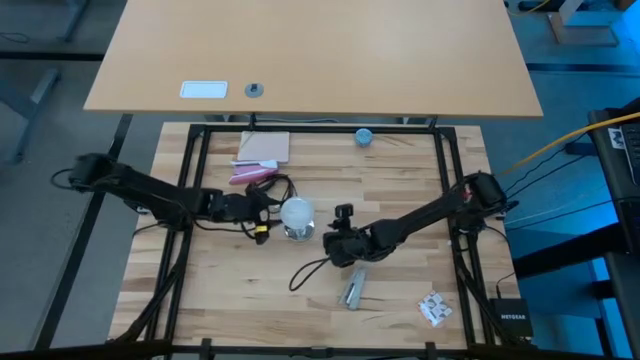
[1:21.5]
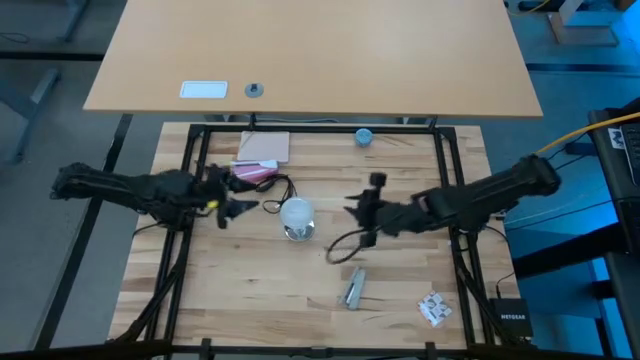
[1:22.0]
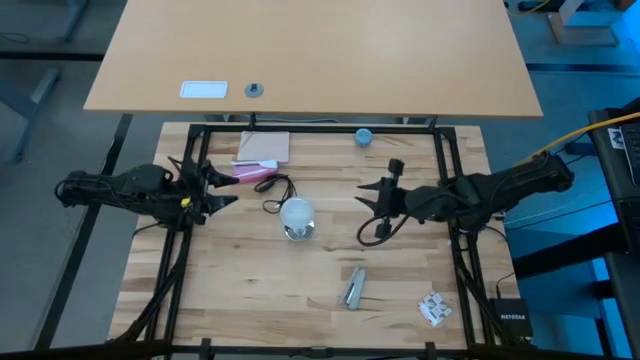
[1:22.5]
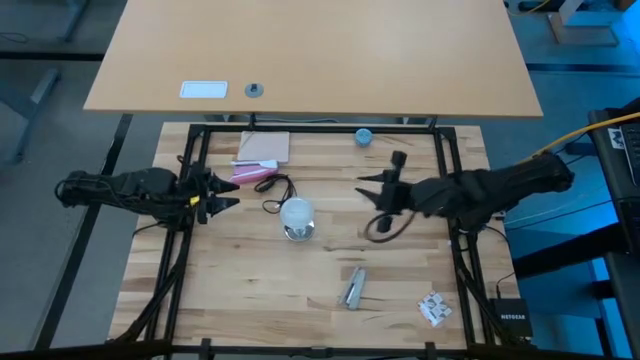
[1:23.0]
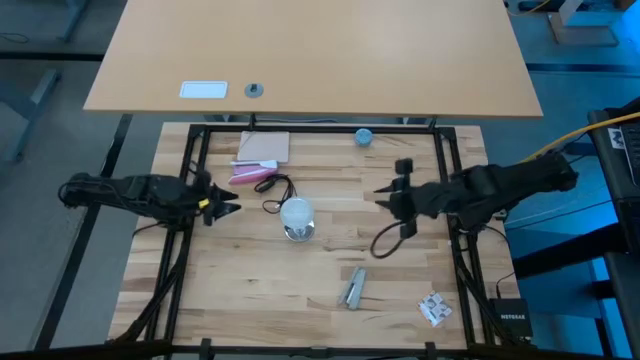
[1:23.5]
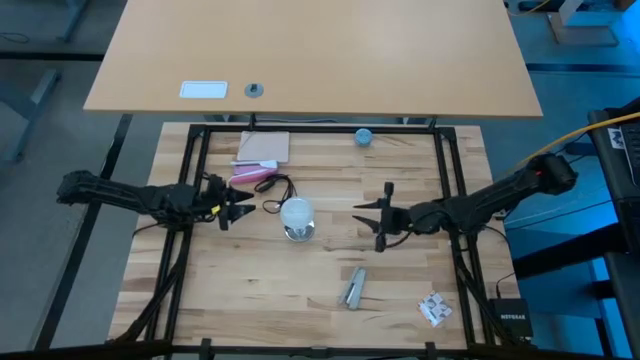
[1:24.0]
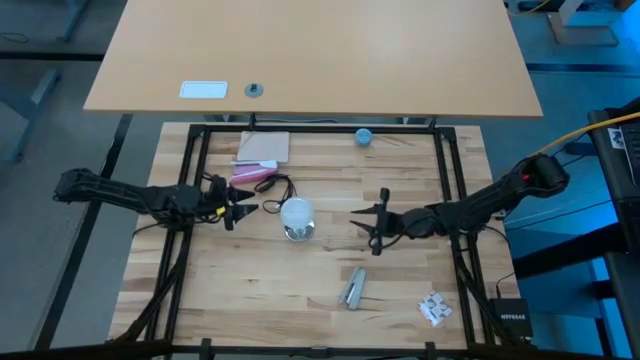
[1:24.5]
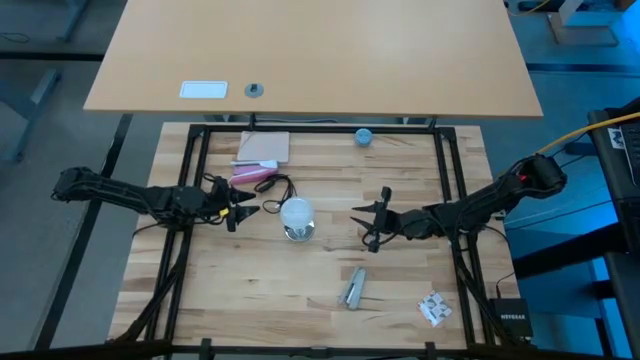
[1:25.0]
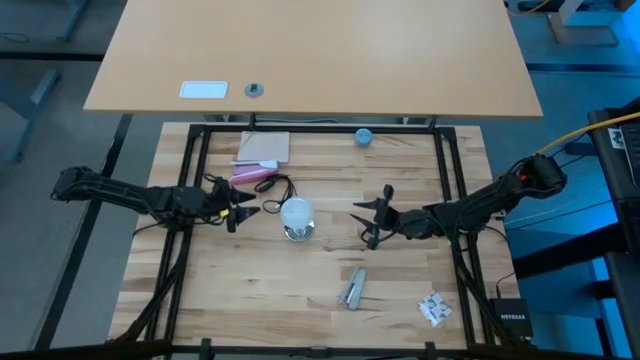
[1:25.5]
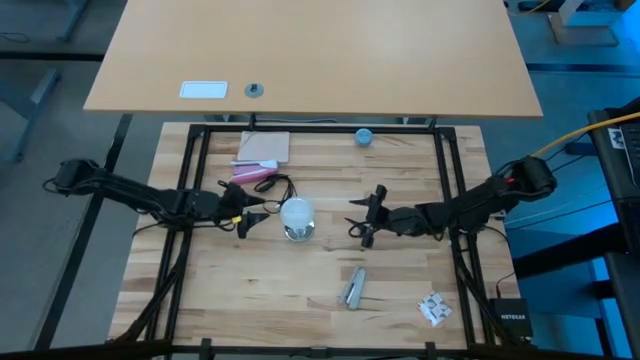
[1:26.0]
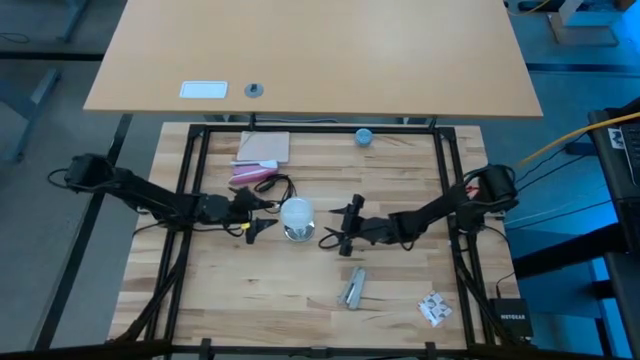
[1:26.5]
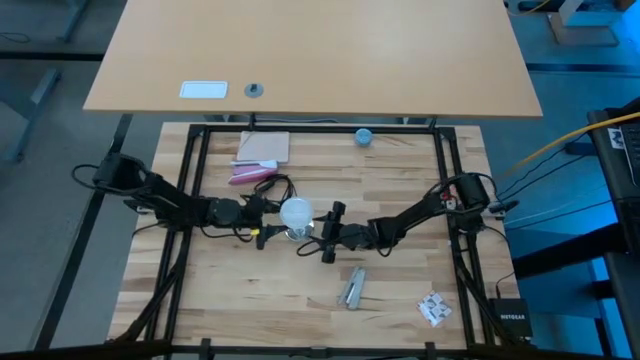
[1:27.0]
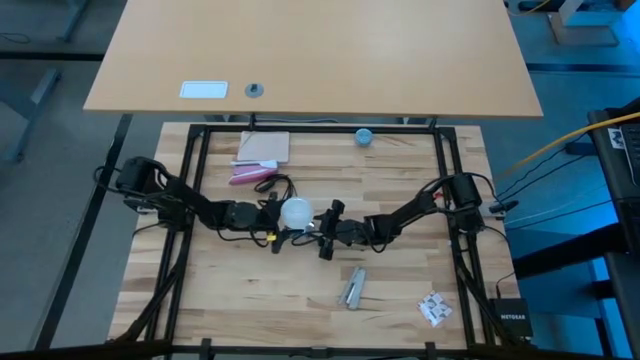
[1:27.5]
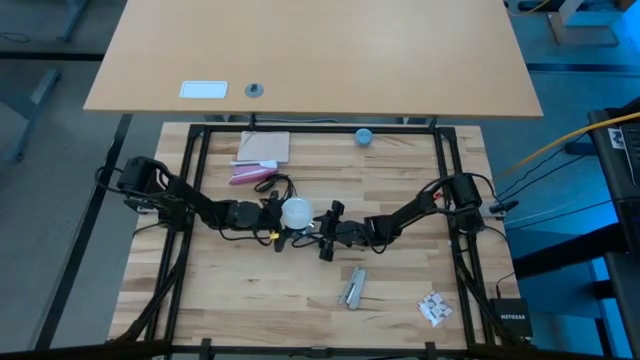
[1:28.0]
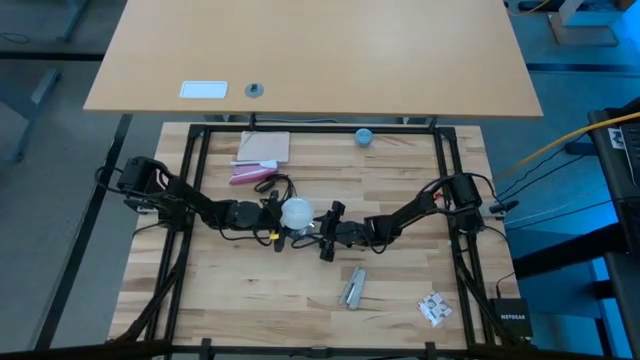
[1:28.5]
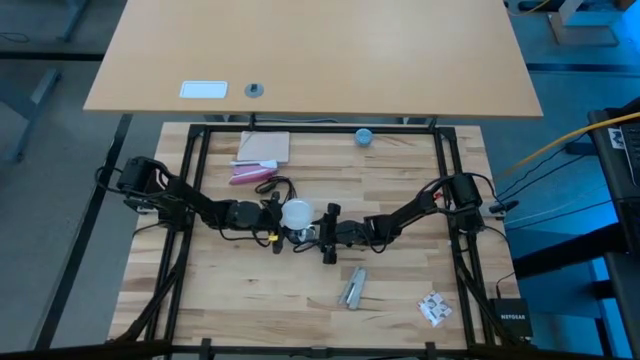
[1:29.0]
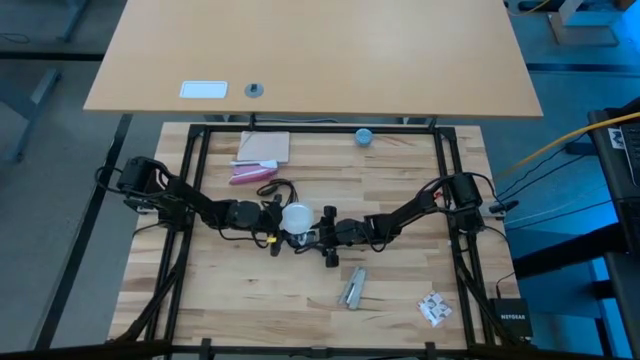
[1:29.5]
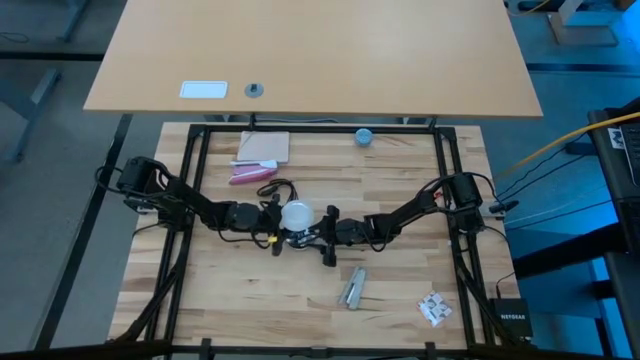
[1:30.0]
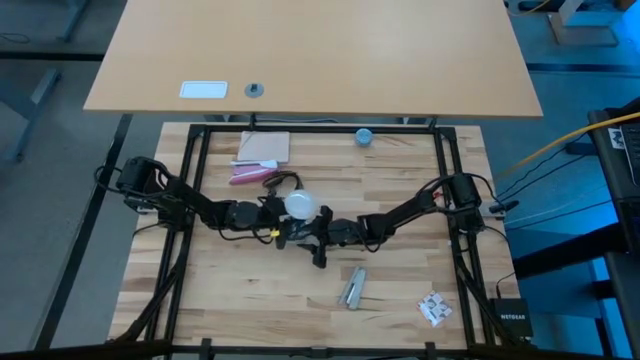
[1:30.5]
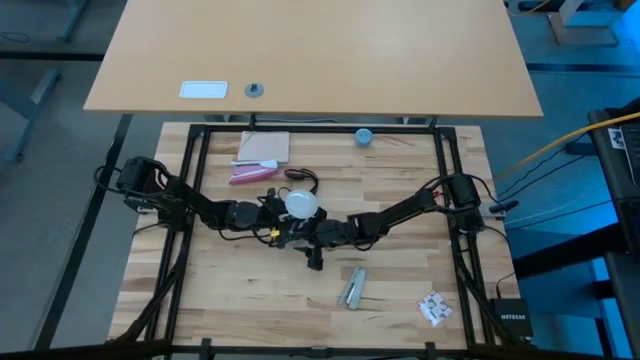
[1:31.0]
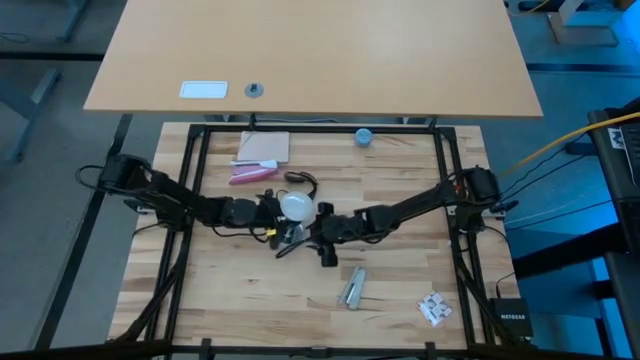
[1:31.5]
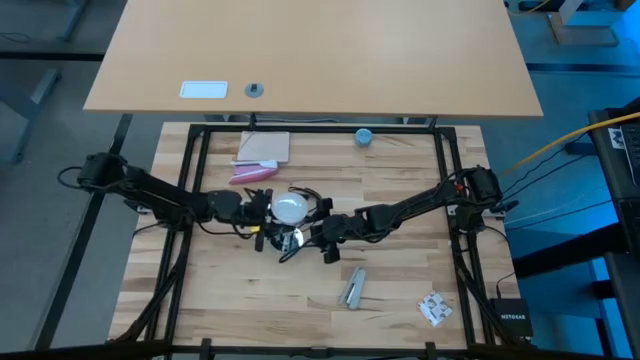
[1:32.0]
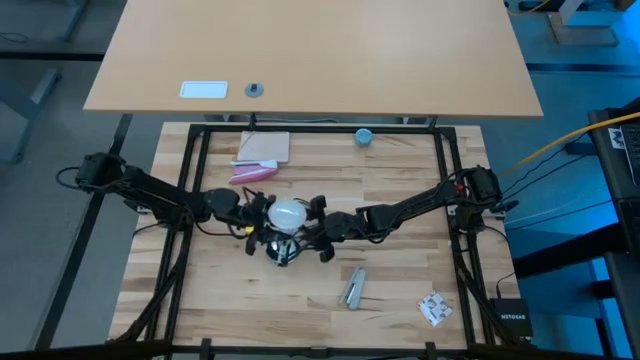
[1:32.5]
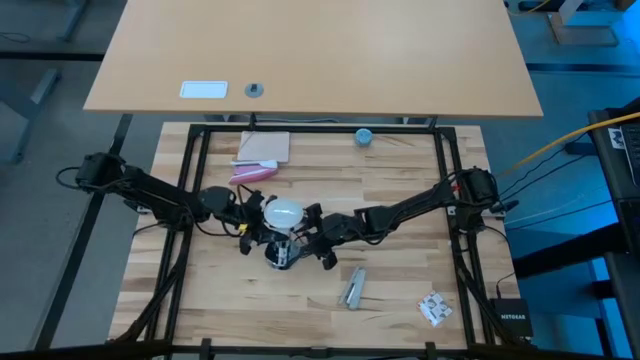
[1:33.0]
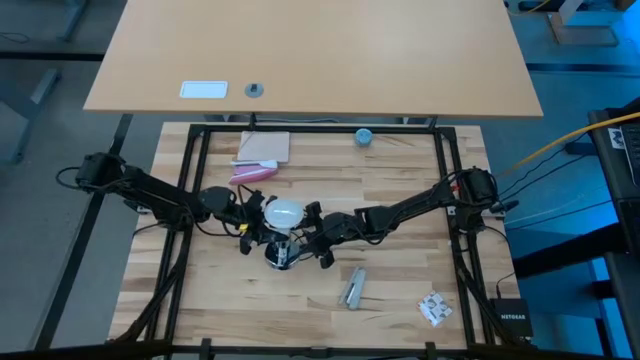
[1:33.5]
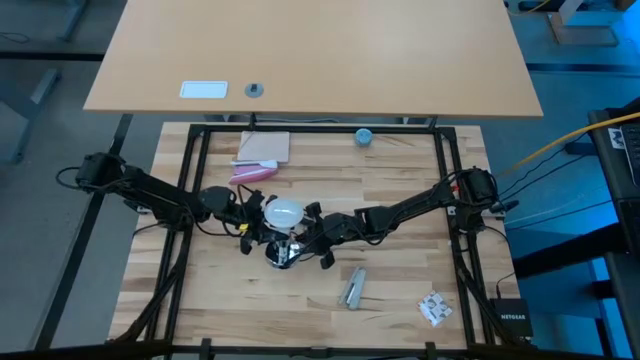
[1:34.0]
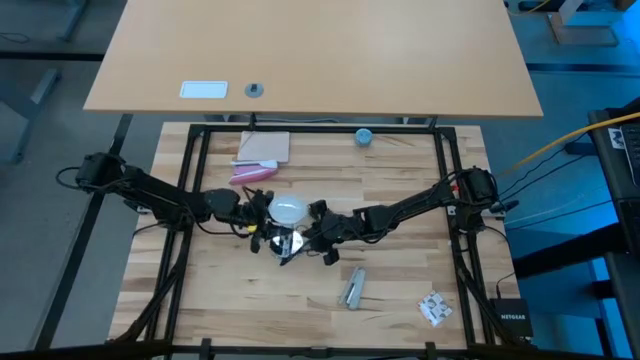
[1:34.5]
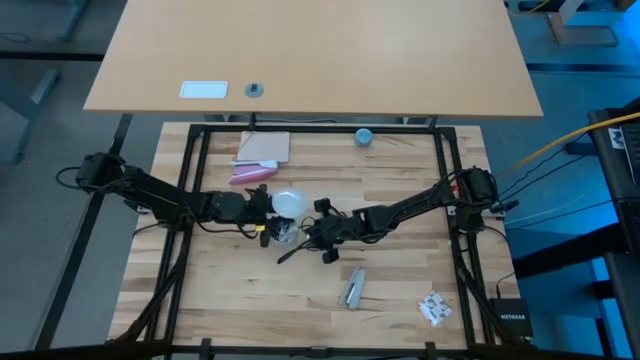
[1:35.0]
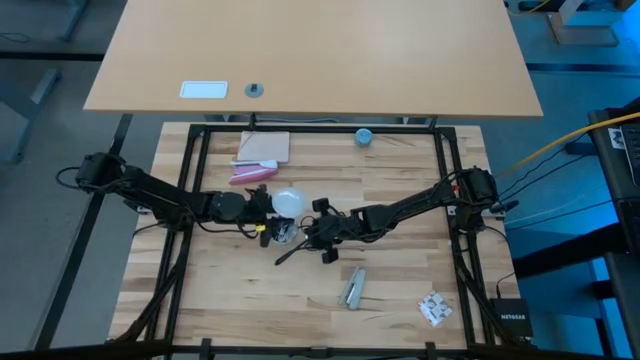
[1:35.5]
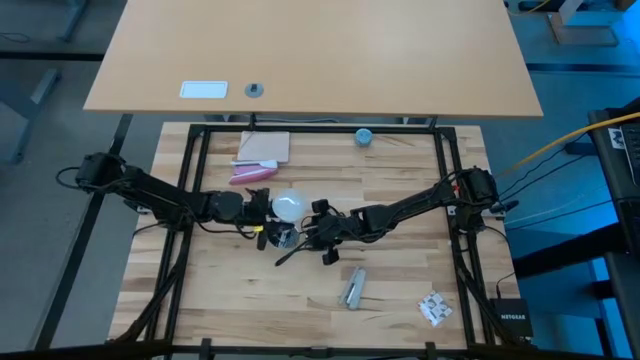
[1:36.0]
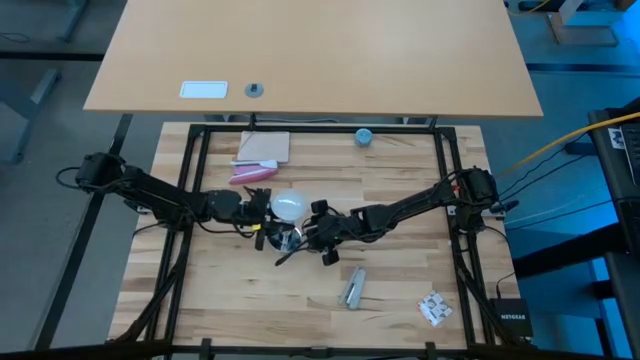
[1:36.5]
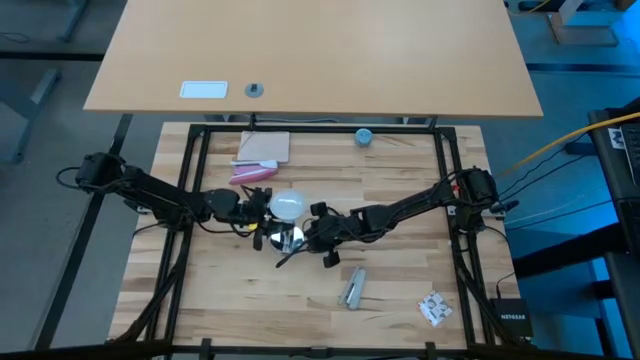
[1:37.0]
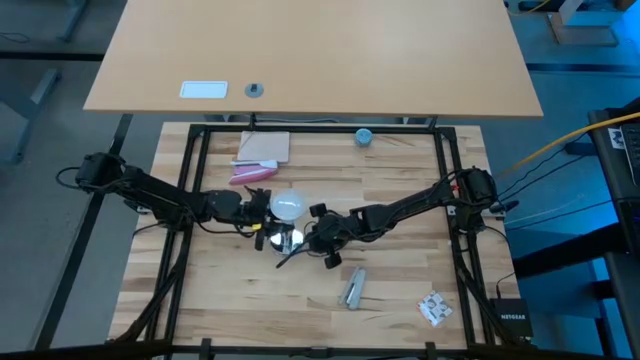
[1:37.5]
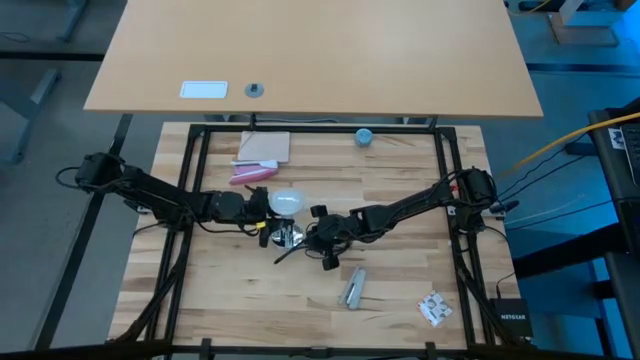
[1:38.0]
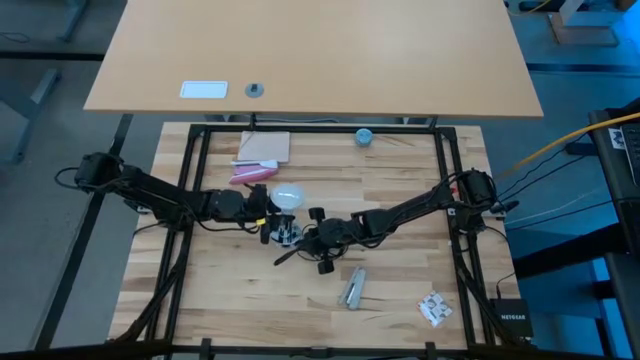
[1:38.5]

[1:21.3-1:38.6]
Task: Screw lightbulb
Remove the lightbulb from the lamp

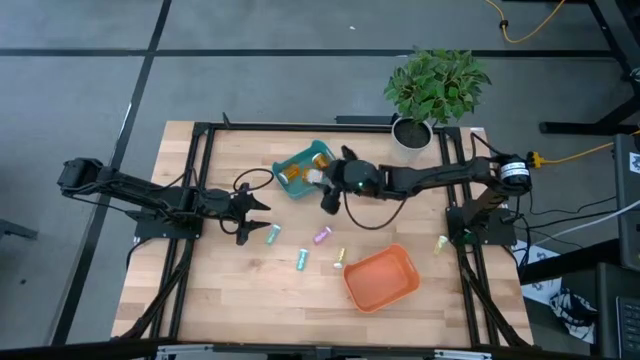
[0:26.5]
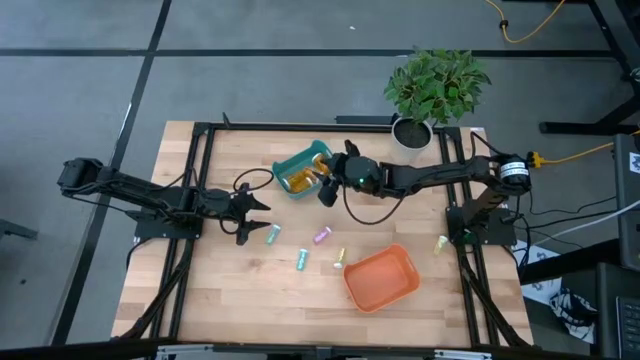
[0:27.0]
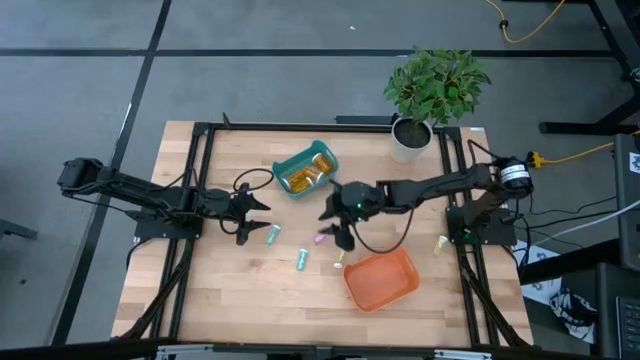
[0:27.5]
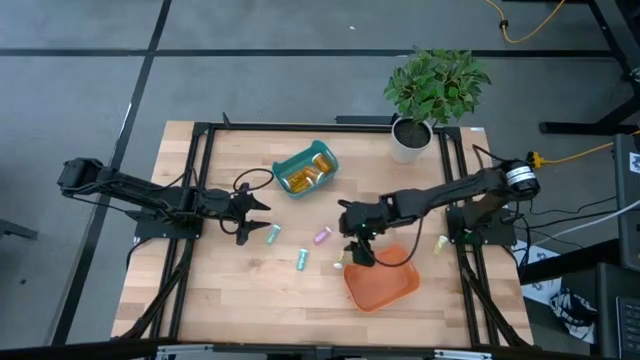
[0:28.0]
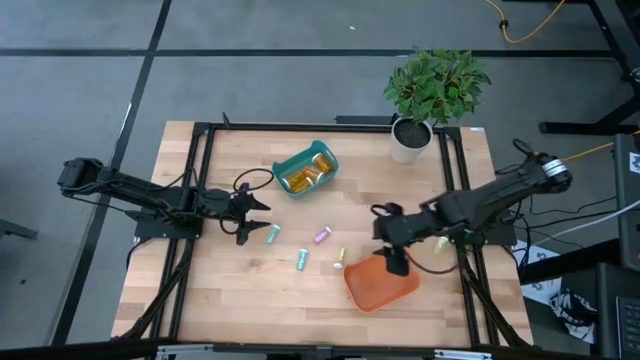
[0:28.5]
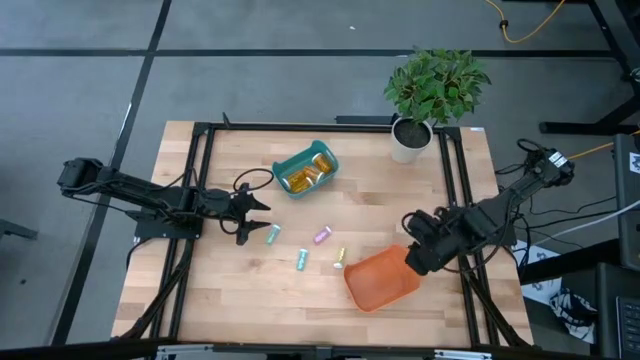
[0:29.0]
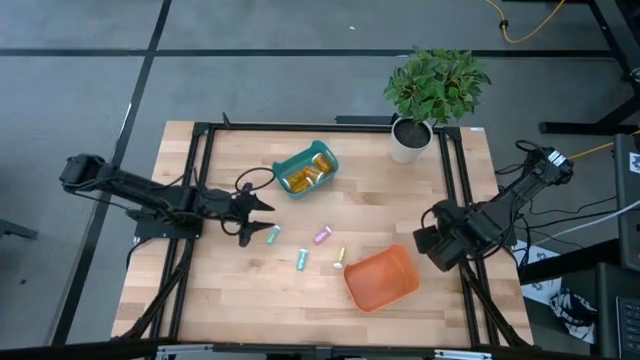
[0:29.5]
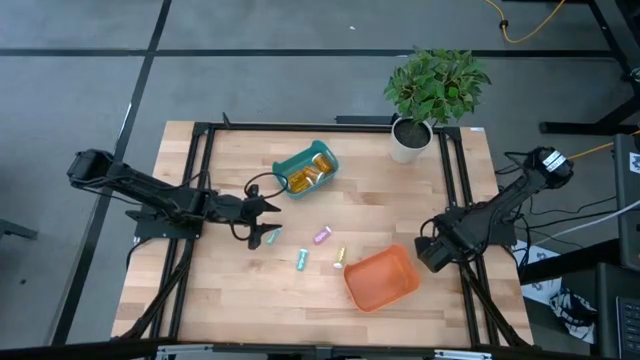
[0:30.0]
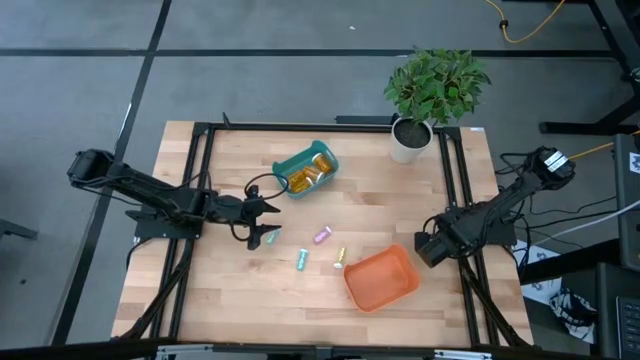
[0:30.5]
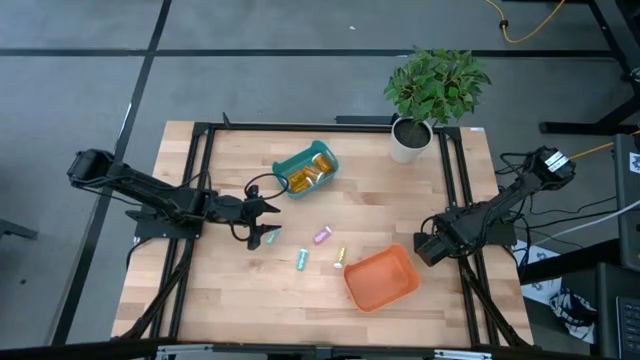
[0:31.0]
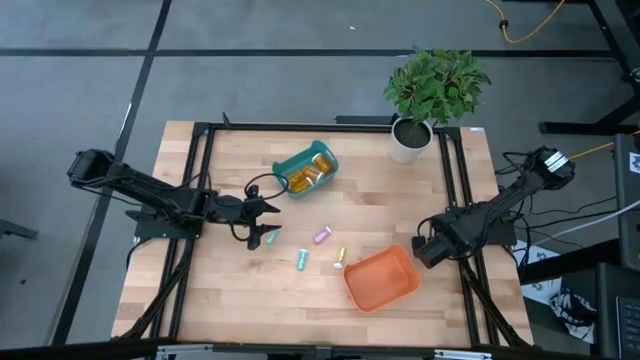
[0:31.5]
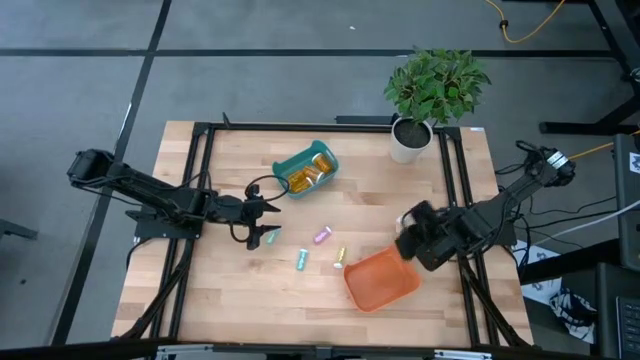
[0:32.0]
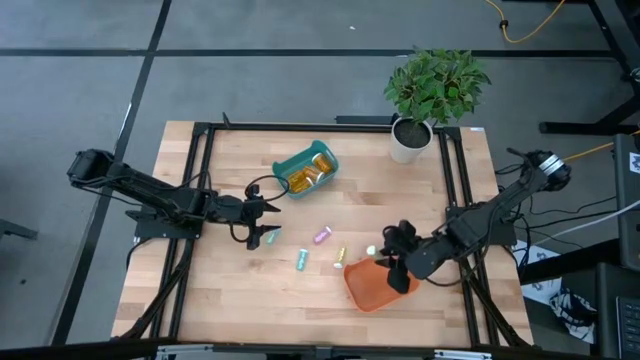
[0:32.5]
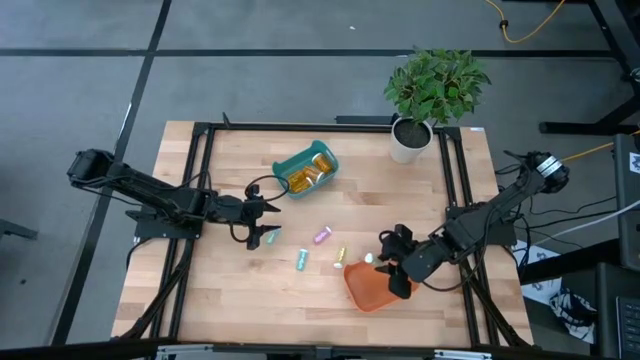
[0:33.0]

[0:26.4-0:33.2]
Task: Pick and place medicine bottles into bin by pill shape (circle, oval)
Put the right small yellow pill bottle into the orange bin
